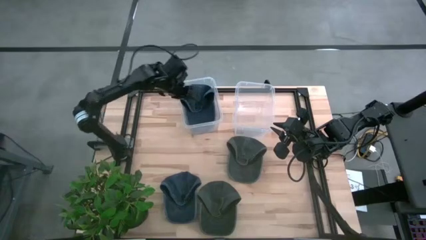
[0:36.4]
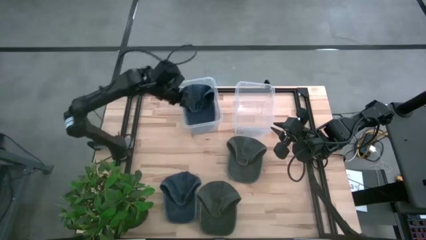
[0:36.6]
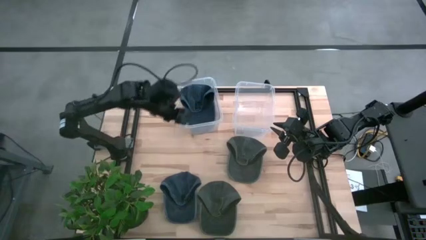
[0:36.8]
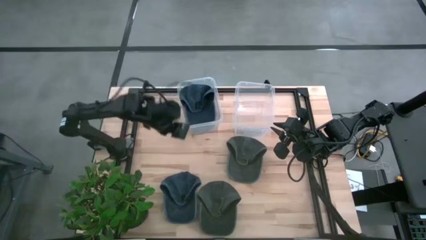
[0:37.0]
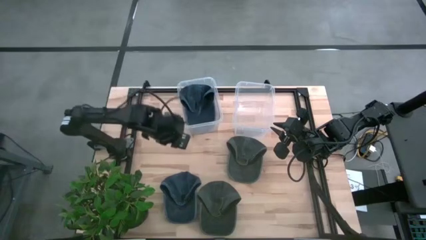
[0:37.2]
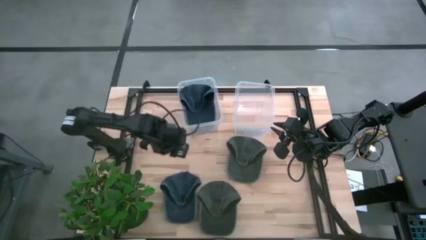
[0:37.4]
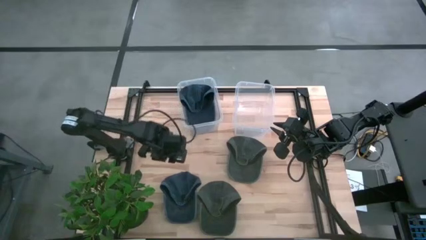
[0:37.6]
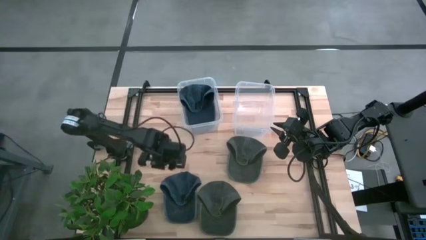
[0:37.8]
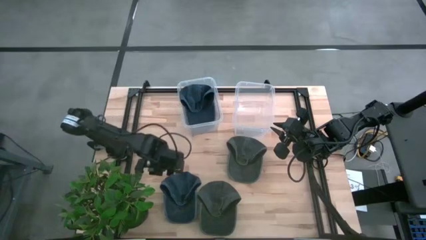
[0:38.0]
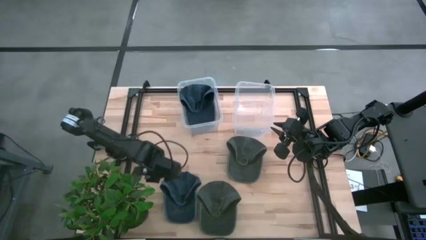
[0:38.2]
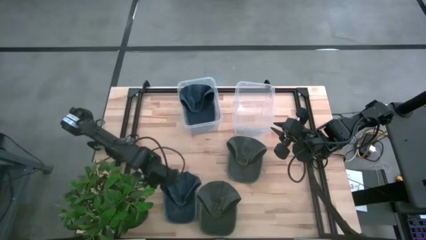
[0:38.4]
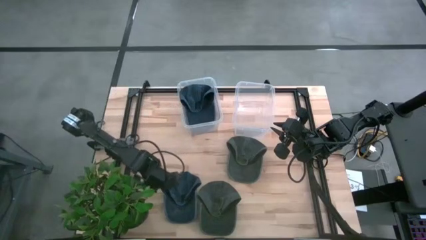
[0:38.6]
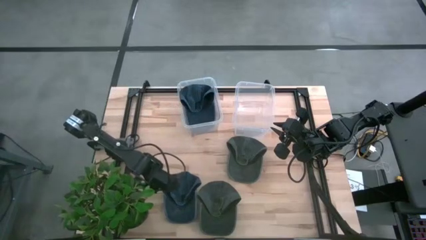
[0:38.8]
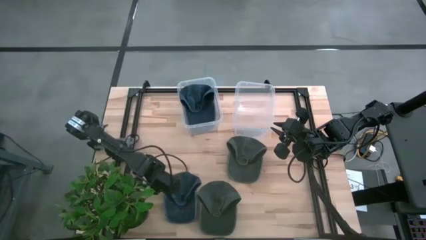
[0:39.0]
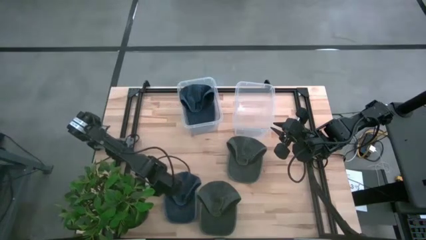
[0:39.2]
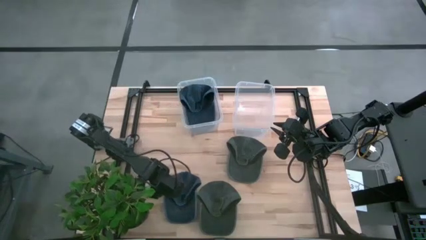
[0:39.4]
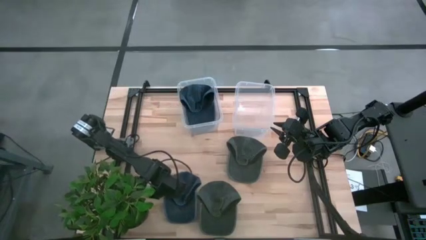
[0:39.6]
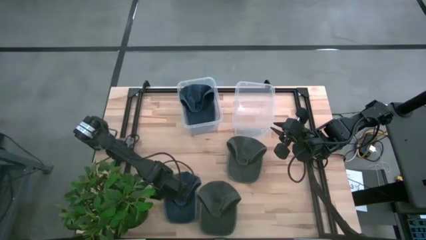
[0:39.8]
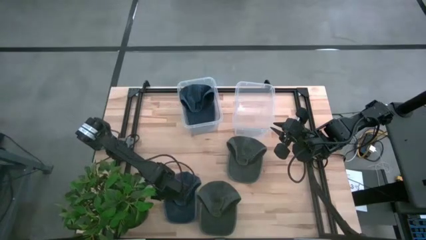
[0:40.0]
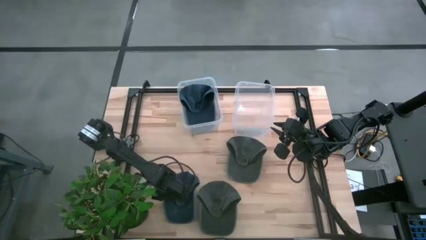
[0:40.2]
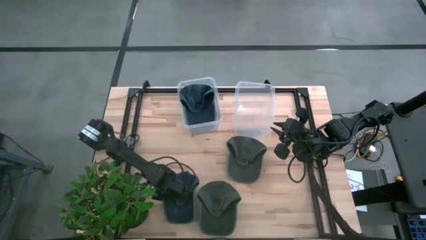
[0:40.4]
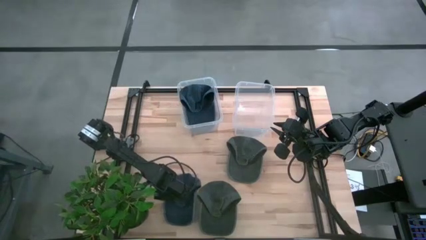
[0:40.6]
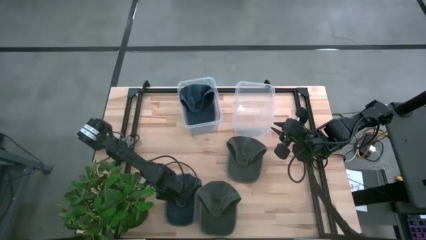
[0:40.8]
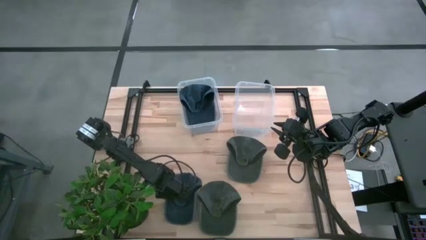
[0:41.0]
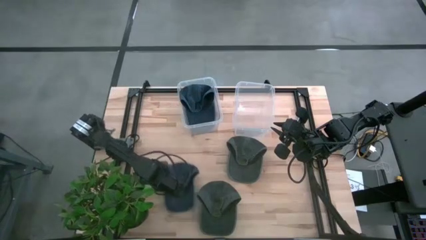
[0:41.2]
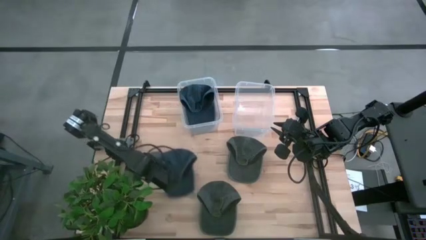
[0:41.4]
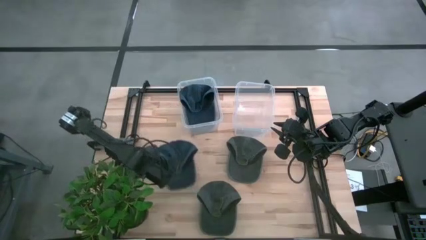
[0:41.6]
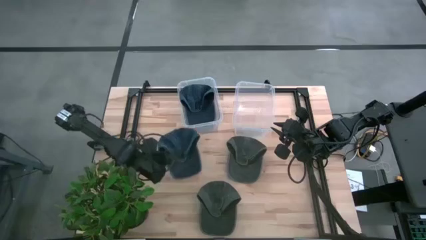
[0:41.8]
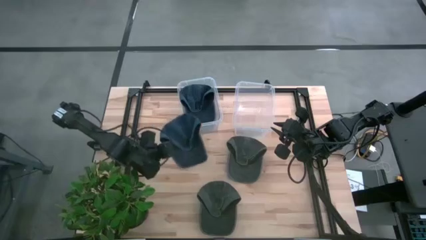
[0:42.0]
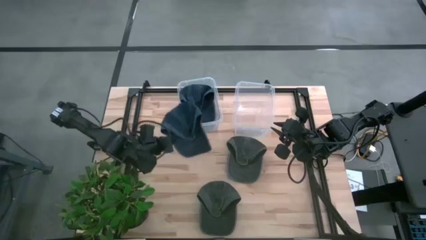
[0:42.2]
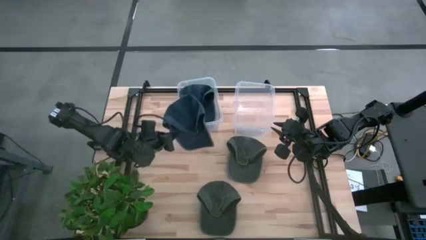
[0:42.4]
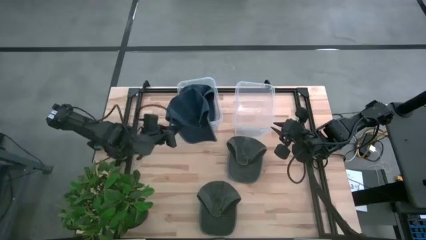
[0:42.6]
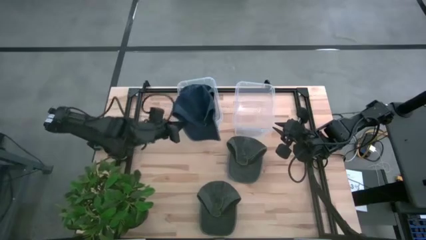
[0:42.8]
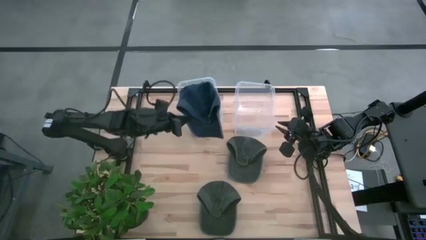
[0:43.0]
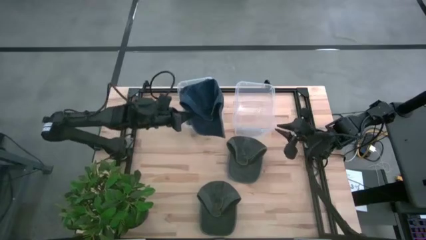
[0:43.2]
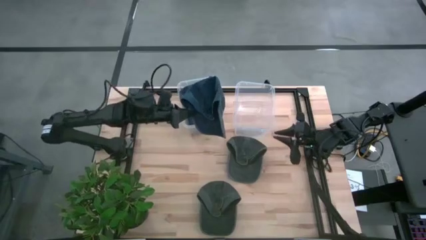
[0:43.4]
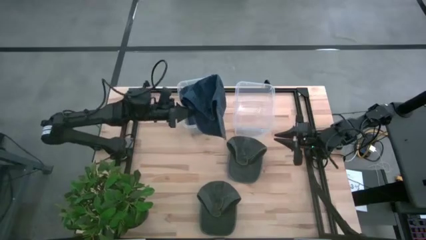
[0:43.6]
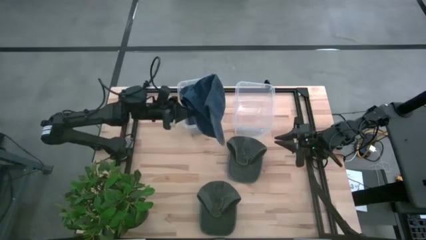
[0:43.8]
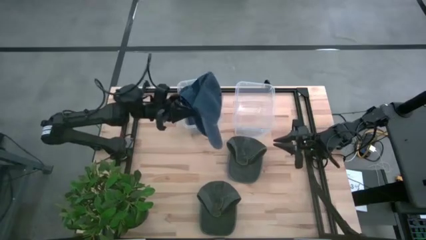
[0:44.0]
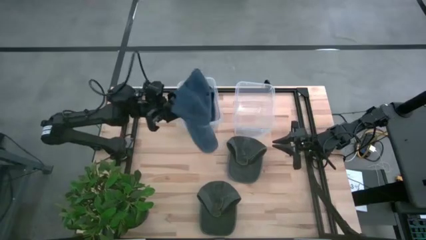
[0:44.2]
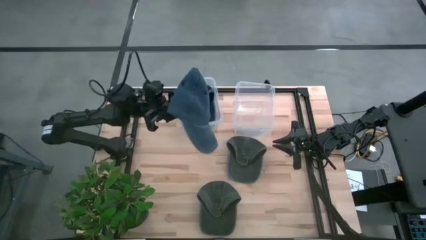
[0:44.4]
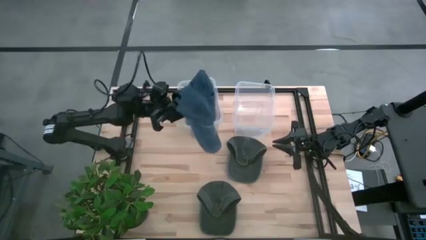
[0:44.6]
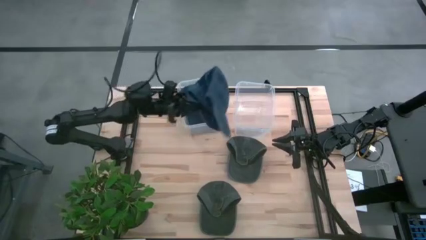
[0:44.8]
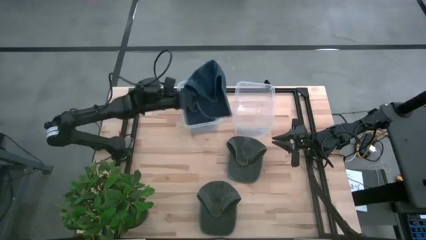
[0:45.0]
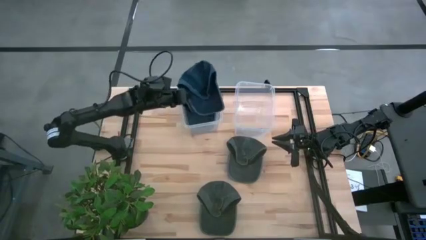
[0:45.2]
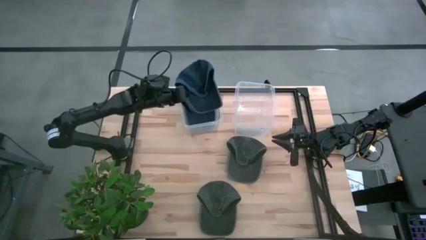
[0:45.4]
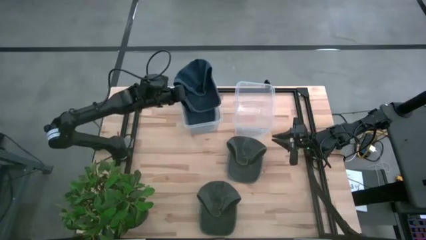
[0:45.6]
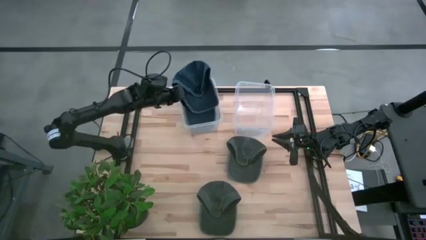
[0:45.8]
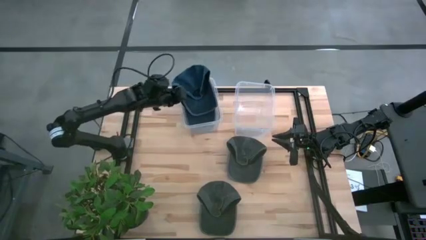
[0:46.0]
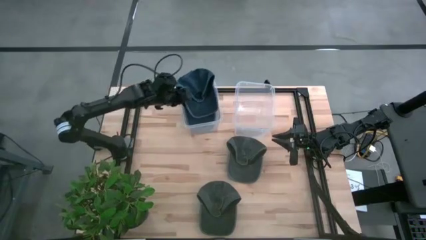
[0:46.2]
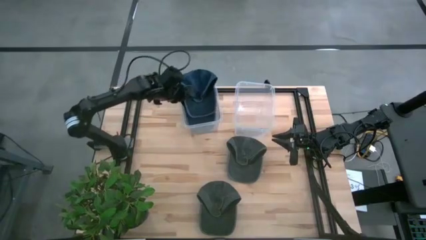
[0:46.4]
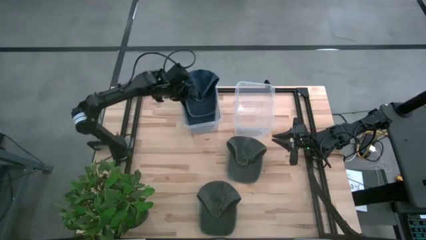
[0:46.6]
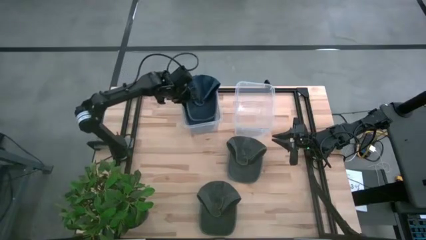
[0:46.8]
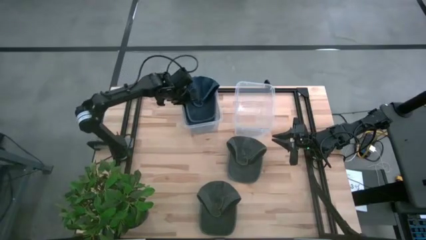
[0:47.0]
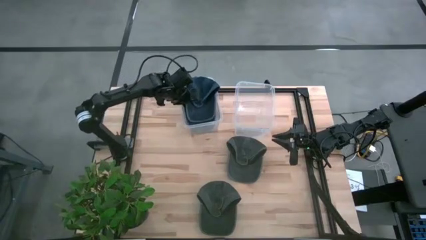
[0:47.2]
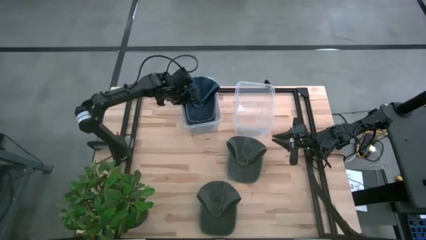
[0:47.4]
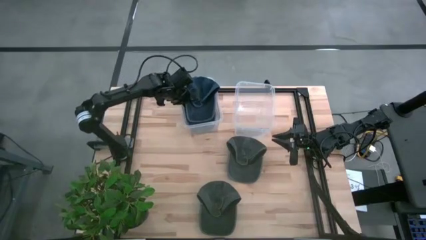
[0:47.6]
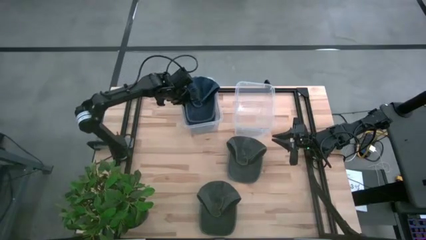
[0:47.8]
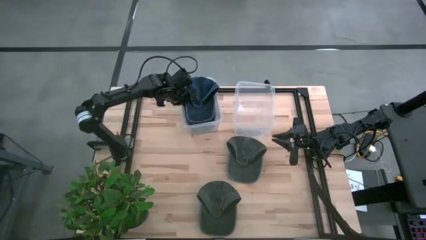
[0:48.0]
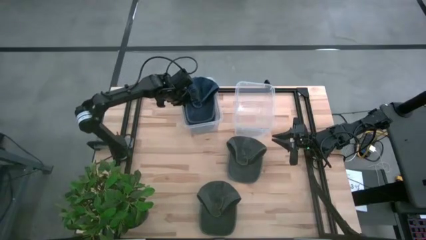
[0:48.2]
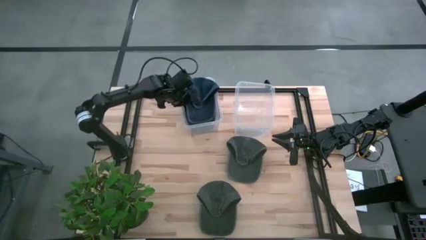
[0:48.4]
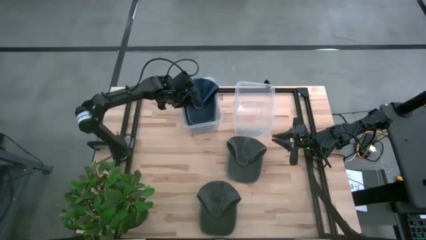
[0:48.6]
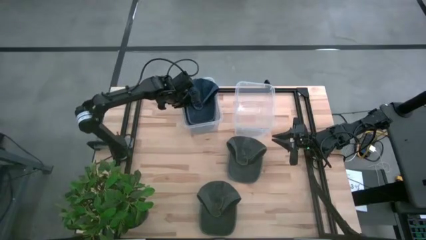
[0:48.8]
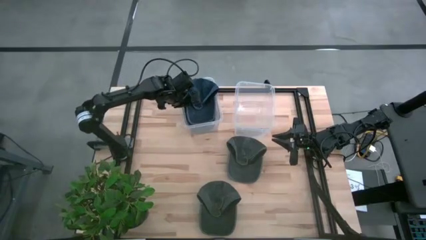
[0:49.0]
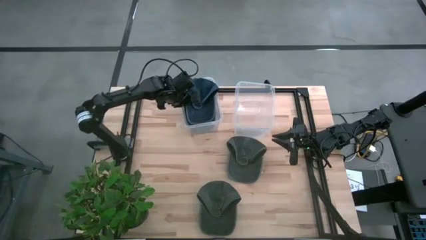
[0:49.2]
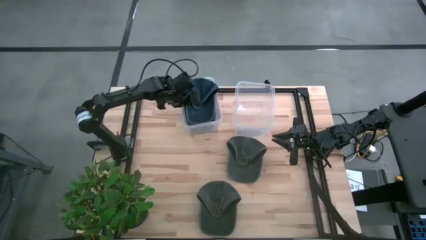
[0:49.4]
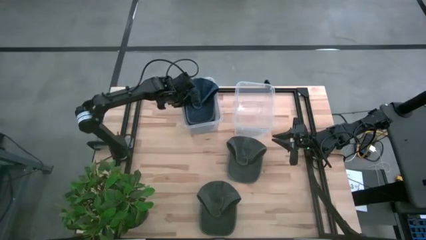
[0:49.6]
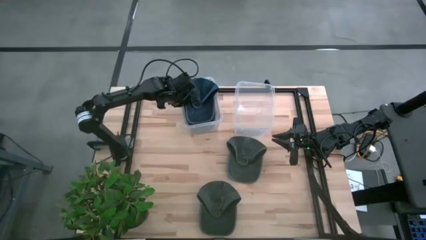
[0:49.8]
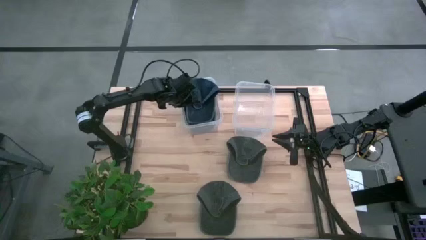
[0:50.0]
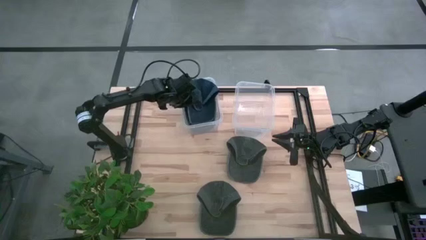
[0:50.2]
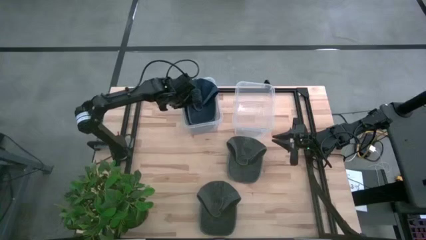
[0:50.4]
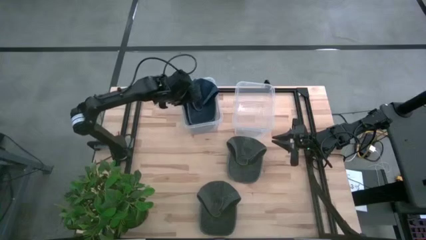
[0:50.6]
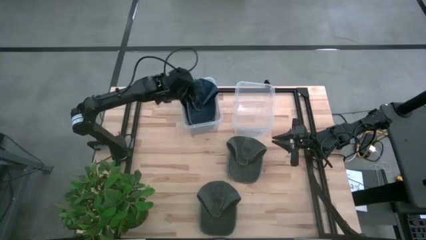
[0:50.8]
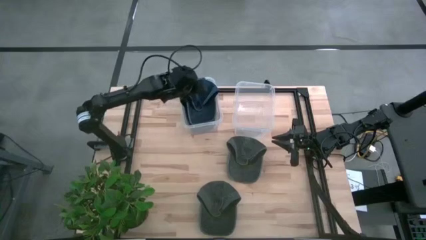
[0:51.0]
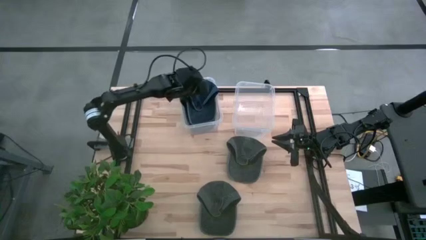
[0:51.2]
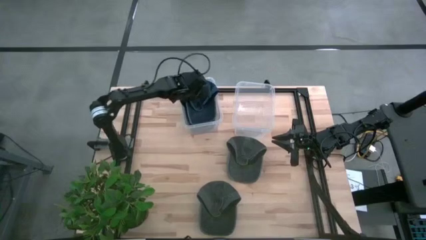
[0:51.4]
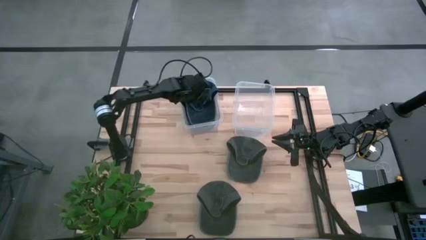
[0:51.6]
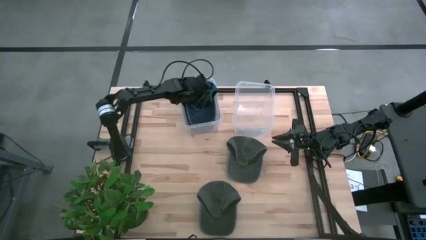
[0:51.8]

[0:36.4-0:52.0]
Task: Pick & Place hat
Put the blue cap into the left transparent bin
